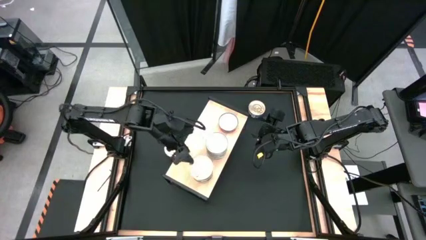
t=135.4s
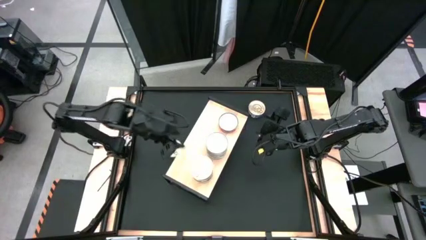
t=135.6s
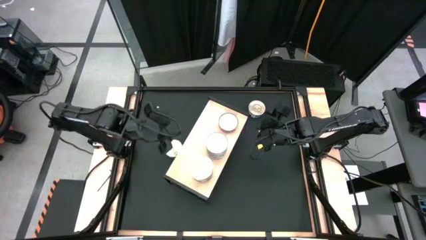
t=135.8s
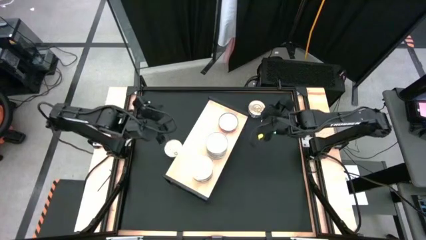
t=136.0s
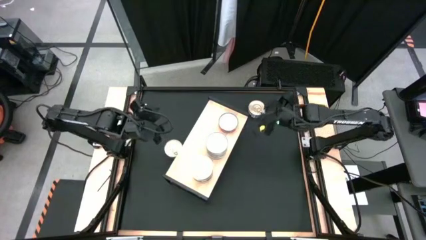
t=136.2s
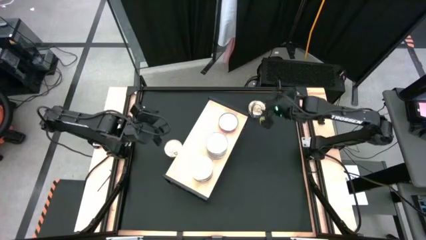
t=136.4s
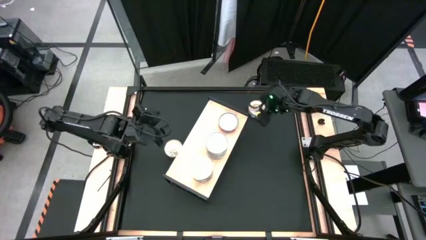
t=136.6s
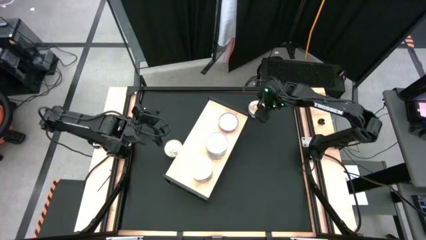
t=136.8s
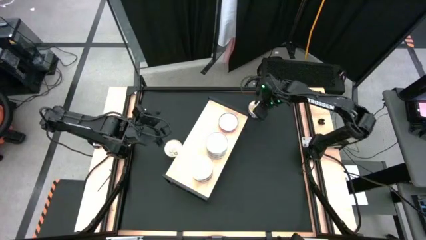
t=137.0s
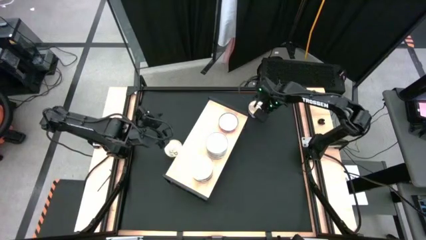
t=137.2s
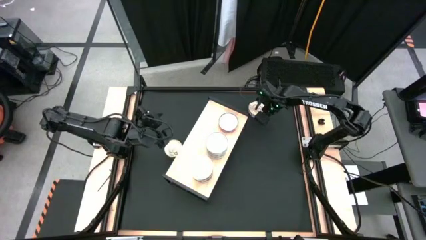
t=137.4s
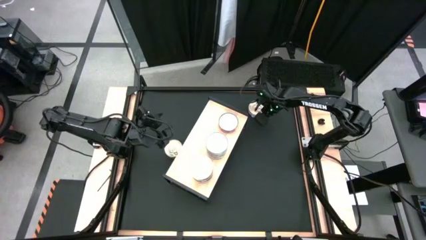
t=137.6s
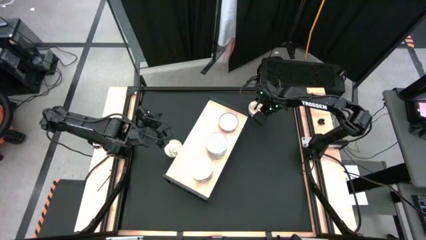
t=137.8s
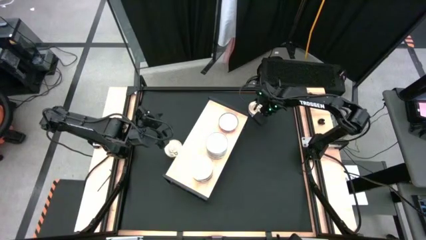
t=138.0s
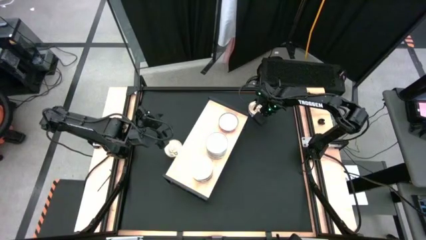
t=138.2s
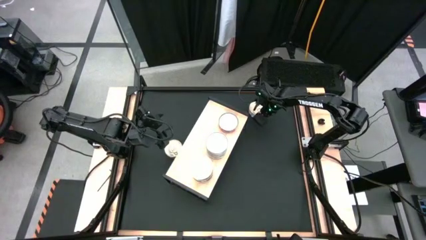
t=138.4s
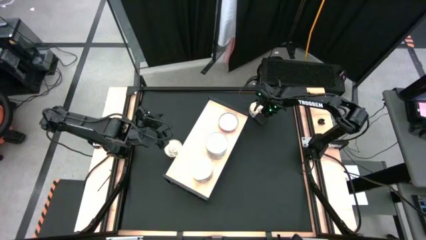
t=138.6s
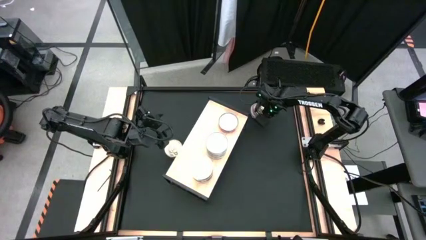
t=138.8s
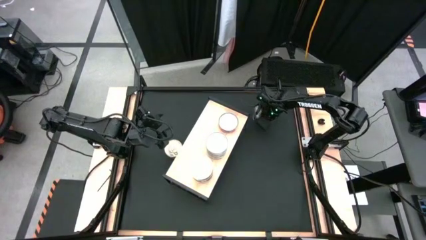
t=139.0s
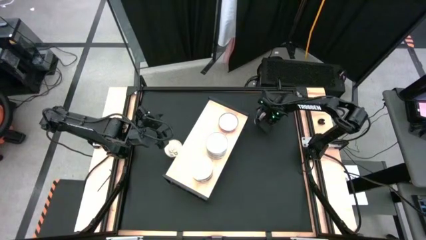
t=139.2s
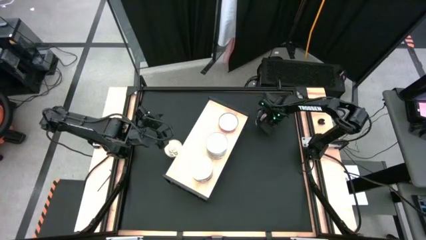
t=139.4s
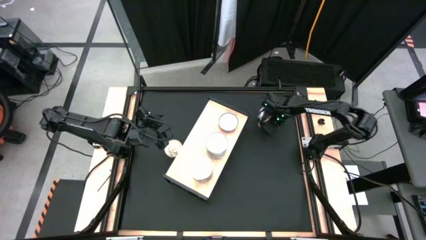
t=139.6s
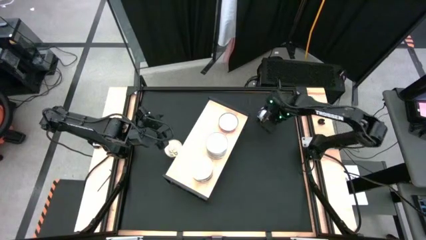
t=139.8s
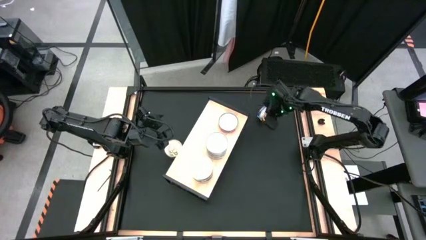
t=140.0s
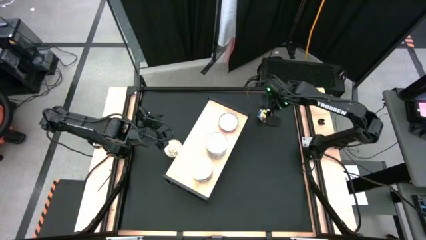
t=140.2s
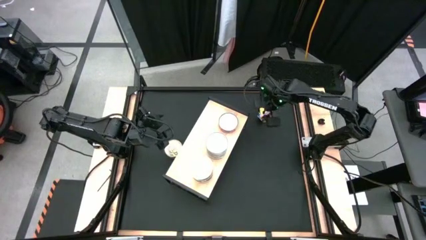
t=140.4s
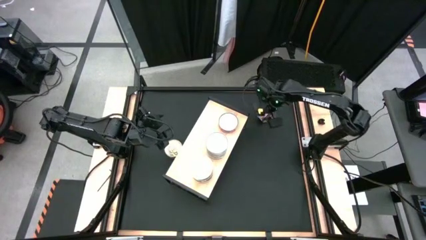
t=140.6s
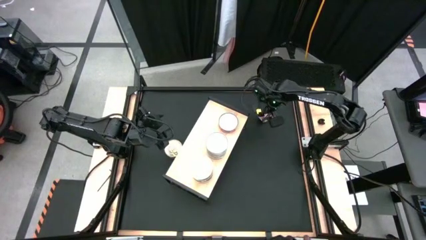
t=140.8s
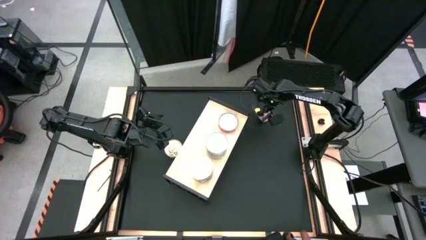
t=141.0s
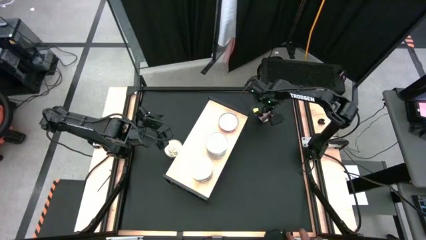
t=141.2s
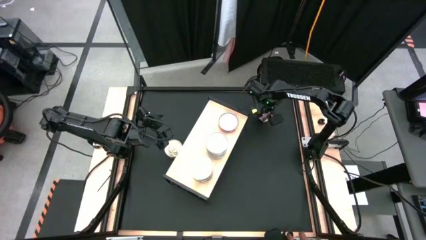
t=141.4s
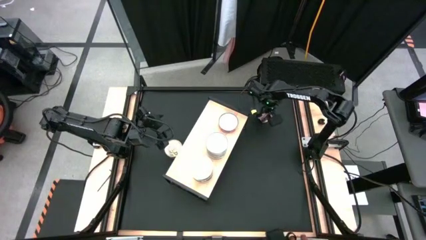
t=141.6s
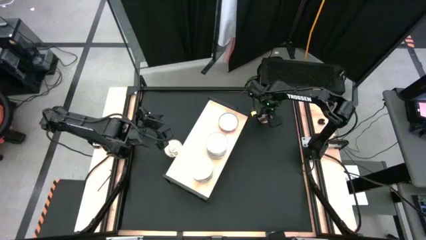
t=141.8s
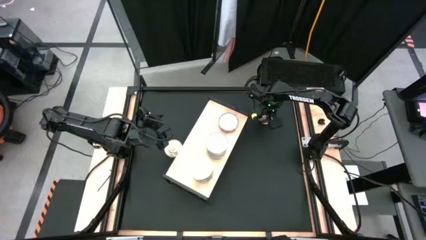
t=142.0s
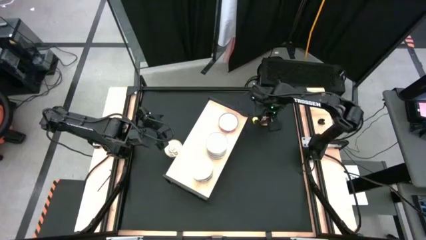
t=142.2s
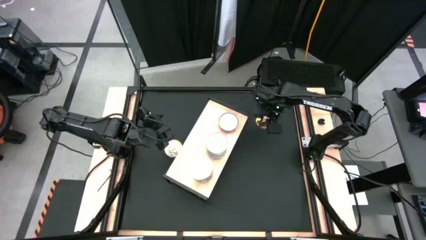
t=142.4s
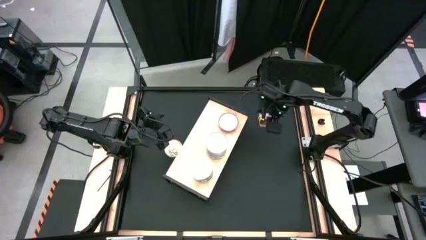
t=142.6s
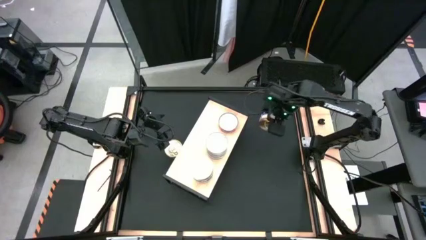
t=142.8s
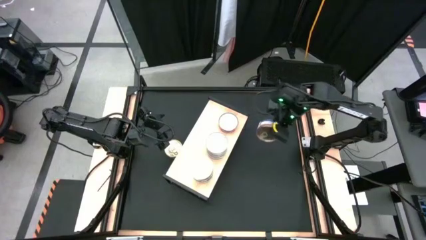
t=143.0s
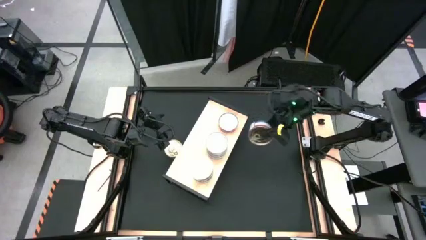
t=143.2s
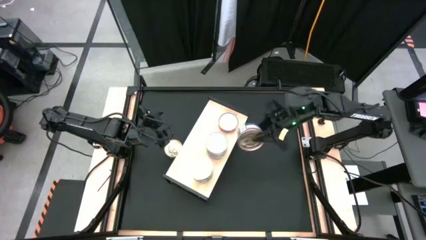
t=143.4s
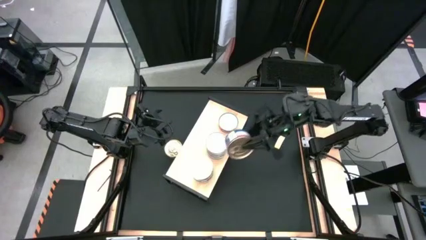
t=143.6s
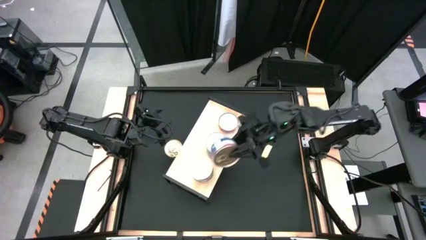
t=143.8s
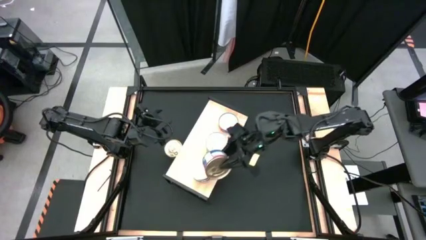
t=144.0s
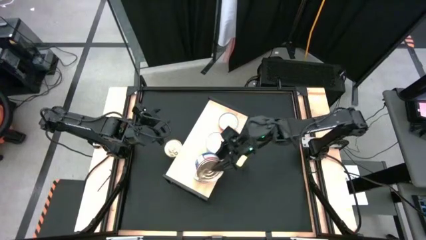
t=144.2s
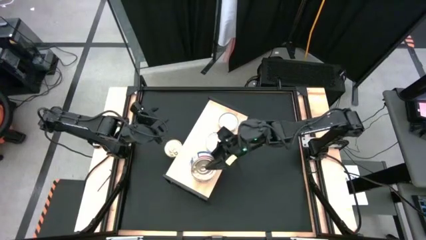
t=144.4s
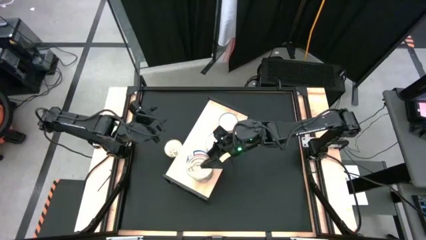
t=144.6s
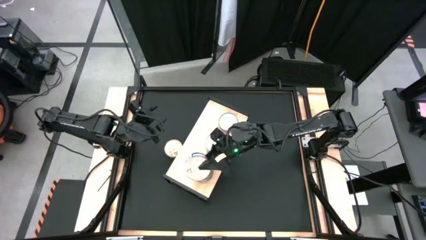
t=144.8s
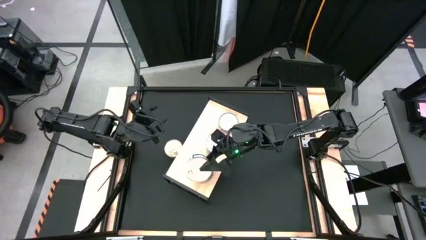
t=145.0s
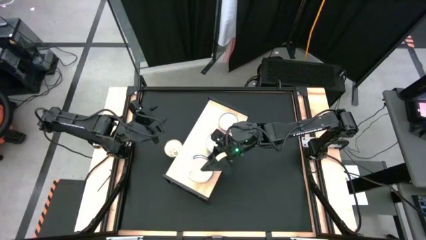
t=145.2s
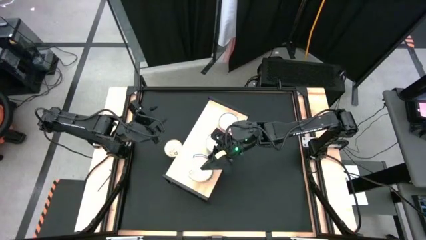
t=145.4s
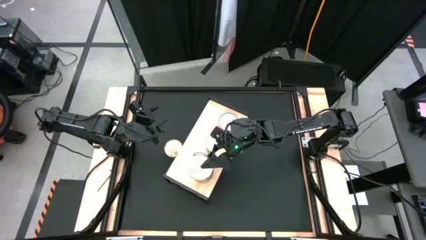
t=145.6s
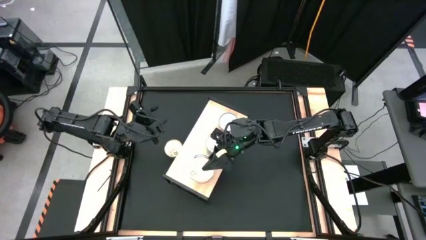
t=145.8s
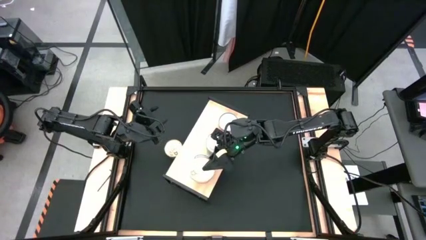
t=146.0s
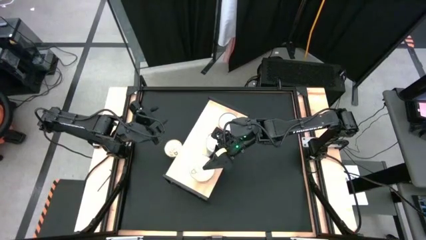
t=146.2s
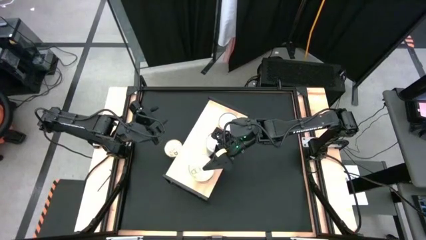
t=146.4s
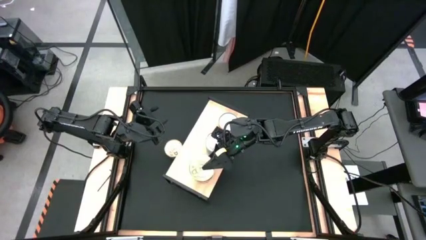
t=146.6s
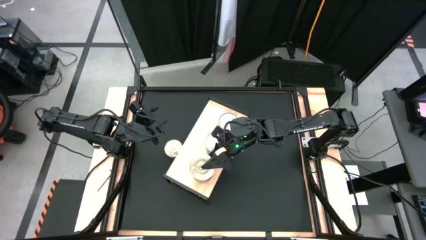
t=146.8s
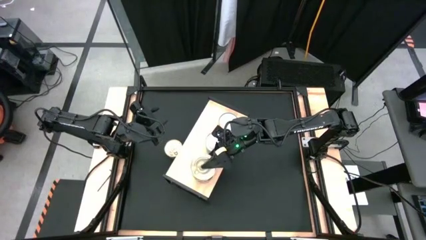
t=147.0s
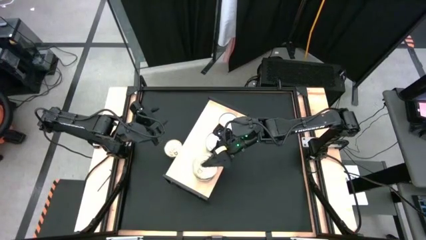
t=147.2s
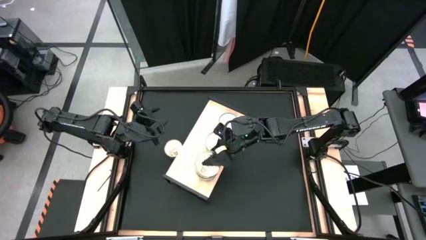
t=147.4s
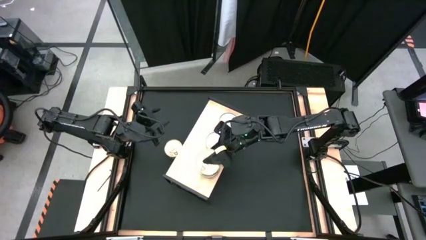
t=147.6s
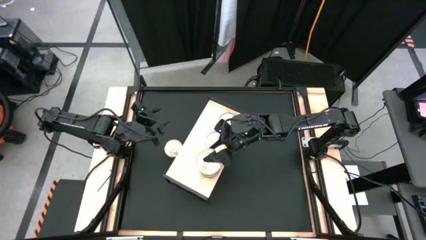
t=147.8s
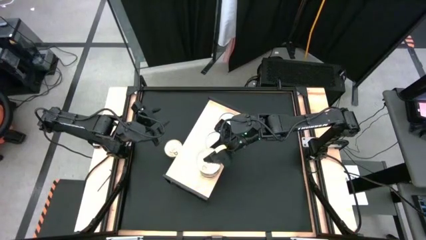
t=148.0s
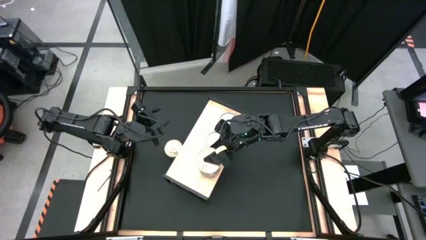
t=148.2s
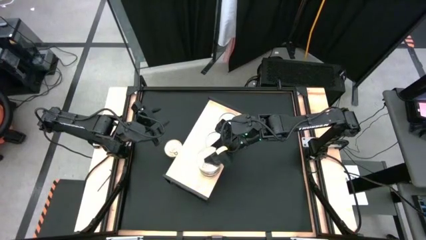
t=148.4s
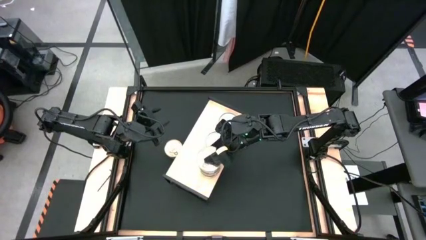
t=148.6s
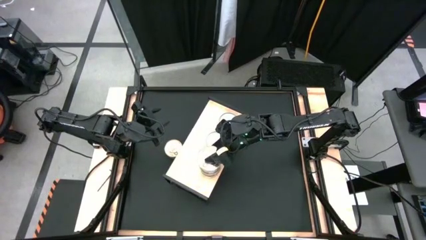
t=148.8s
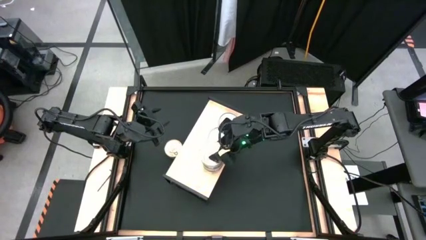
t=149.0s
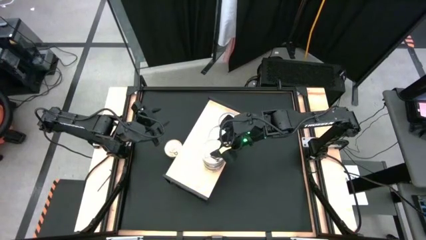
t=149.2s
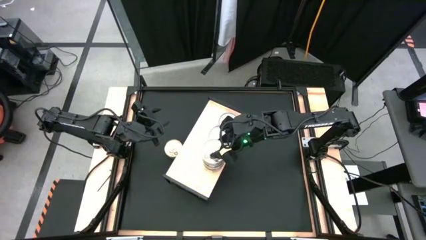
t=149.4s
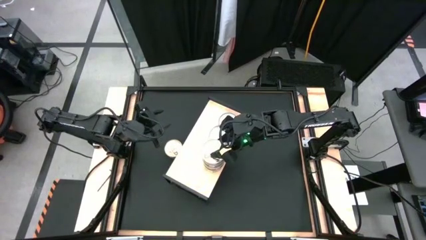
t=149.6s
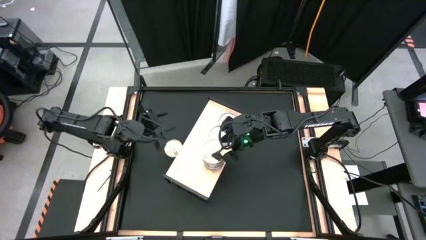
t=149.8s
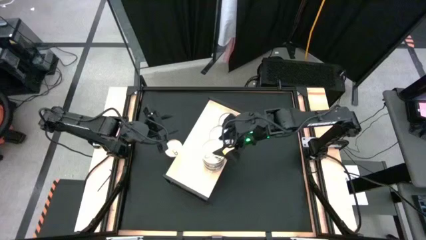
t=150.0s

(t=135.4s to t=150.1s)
Task: Stack canned seafood by type on shelf
Stack the blue tuna can on top of the other blue tuna cans on the shelf

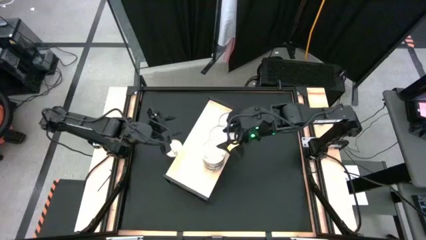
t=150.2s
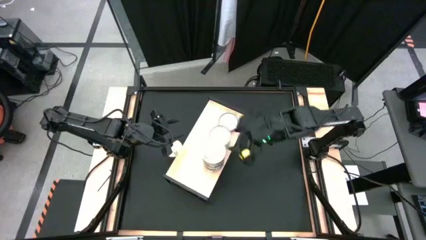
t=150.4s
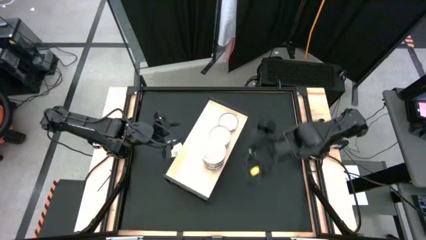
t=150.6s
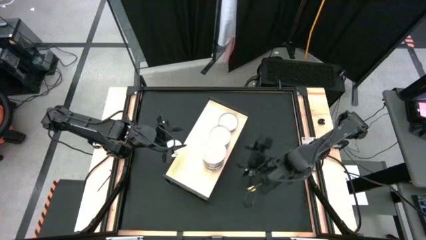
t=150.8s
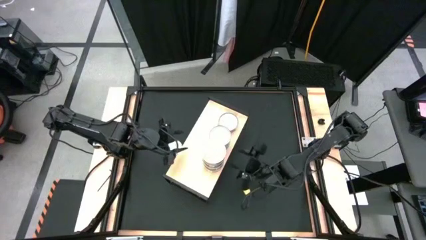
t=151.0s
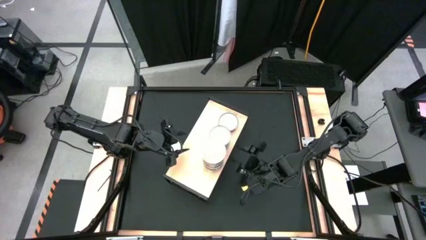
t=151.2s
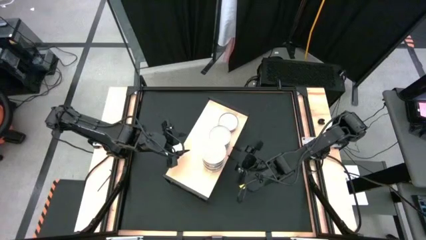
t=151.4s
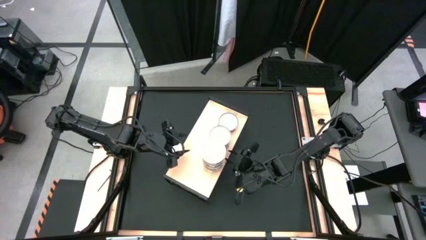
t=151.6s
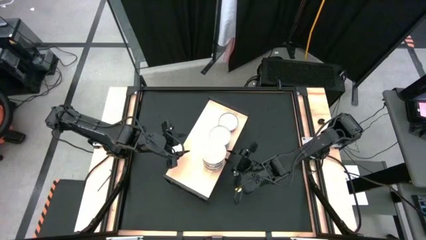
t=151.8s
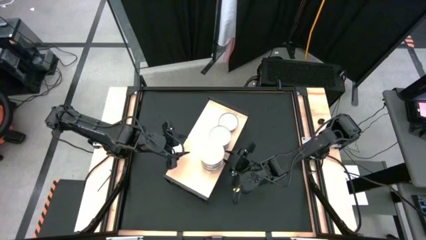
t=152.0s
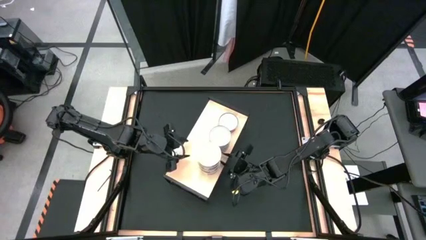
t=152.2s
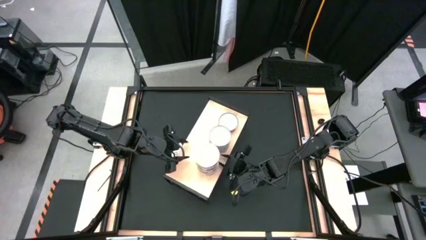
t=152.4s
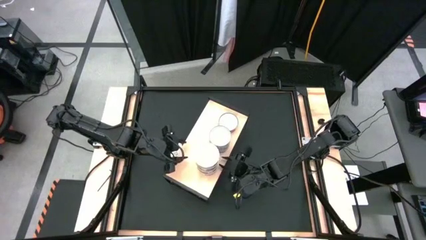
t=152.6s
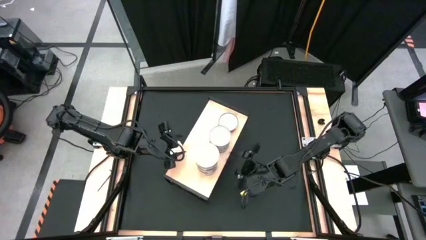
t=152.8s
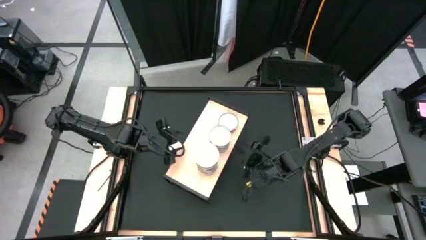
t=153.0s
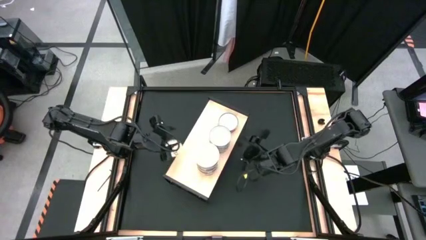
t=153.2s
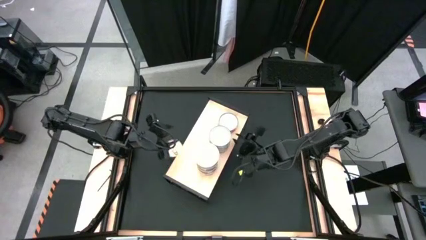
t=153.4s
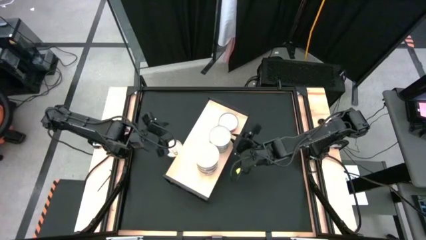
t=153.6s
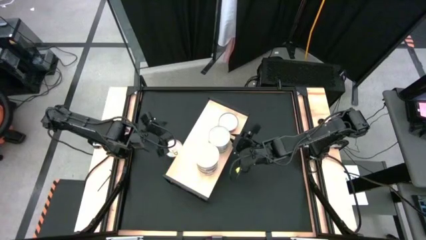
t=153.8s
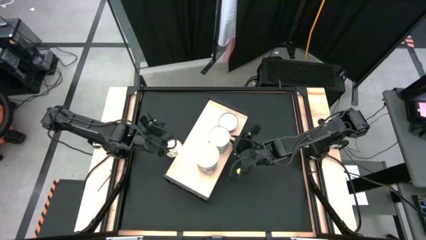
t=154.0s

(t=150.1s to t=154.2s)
Adjust the stacked tuna cans on the shelf
